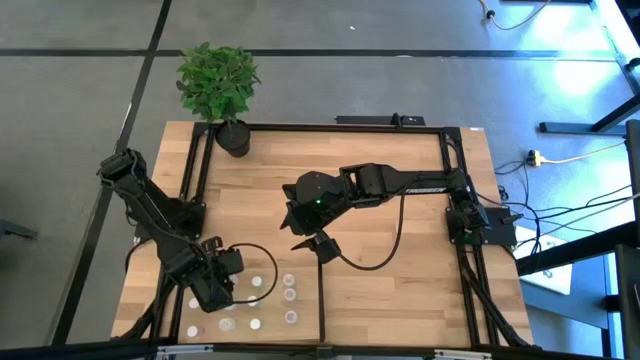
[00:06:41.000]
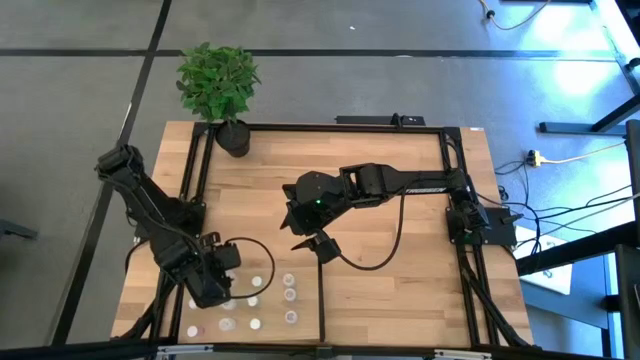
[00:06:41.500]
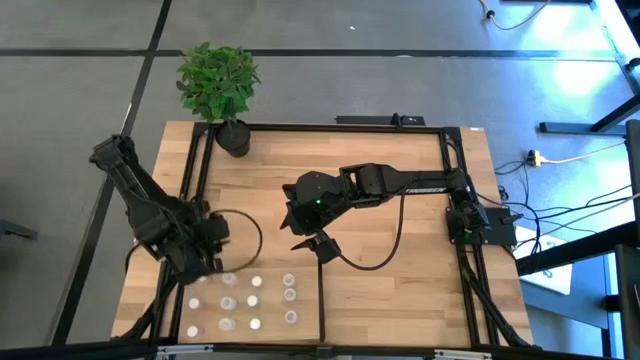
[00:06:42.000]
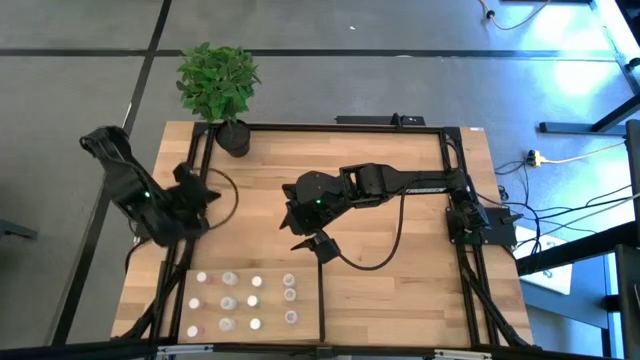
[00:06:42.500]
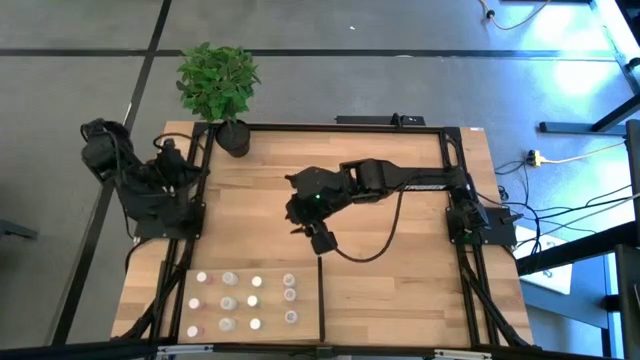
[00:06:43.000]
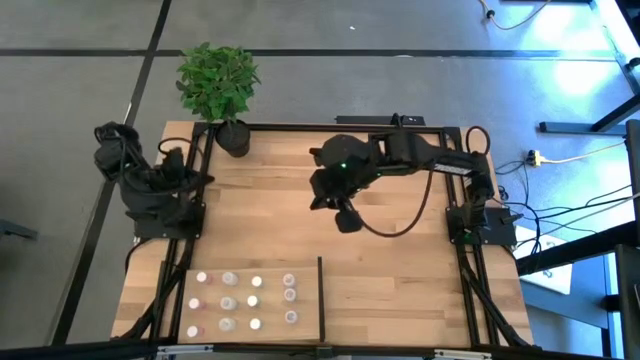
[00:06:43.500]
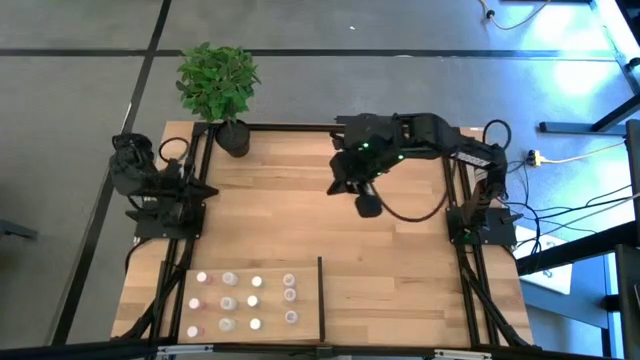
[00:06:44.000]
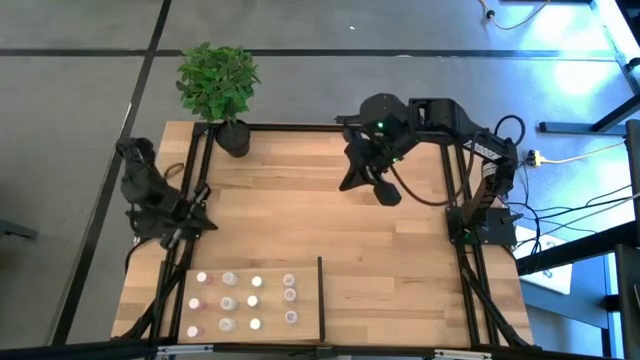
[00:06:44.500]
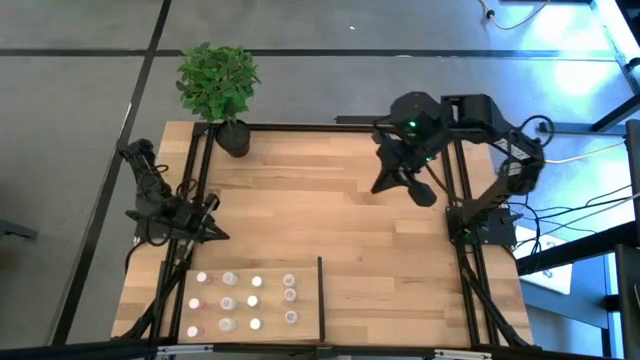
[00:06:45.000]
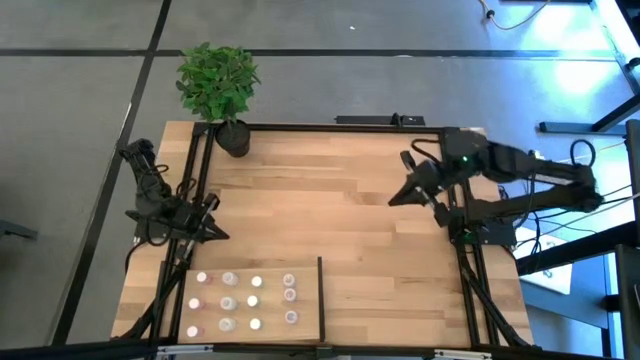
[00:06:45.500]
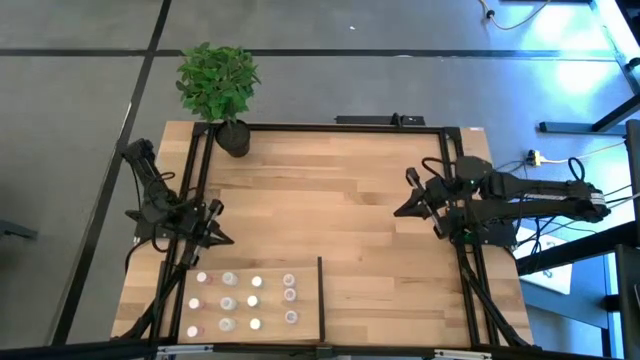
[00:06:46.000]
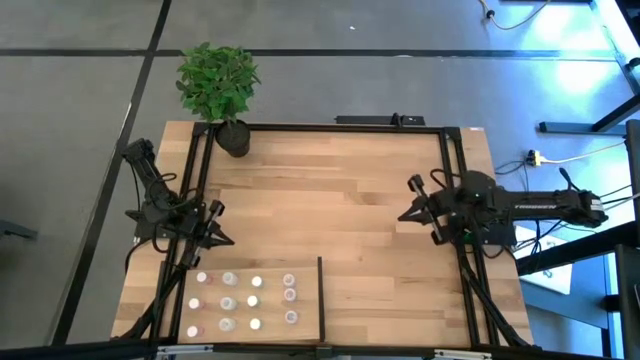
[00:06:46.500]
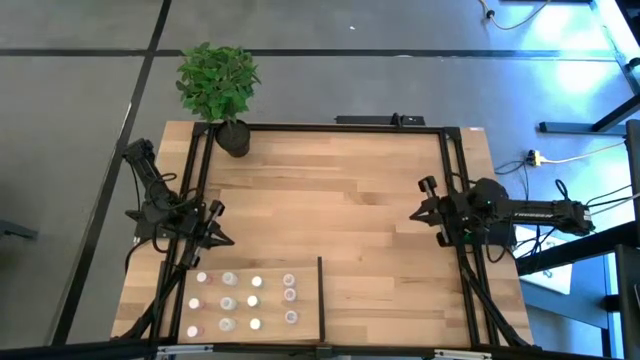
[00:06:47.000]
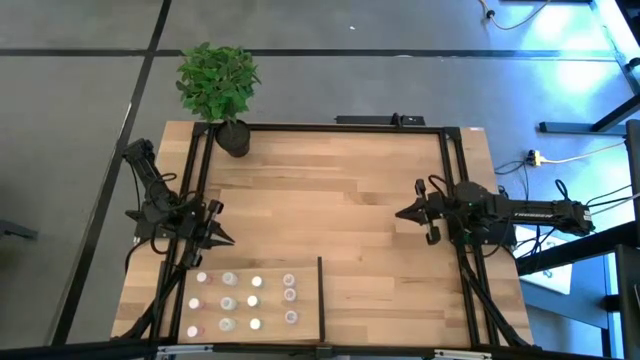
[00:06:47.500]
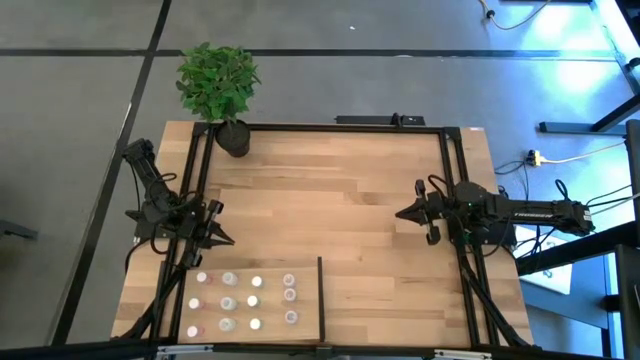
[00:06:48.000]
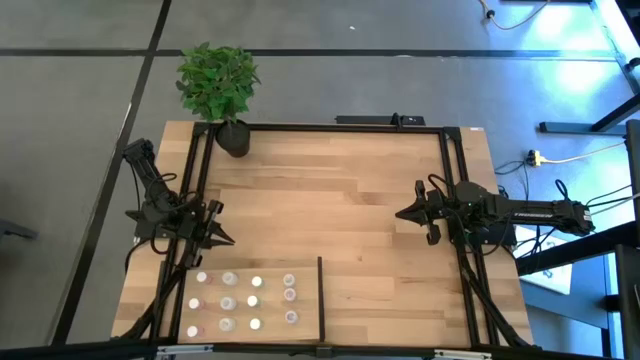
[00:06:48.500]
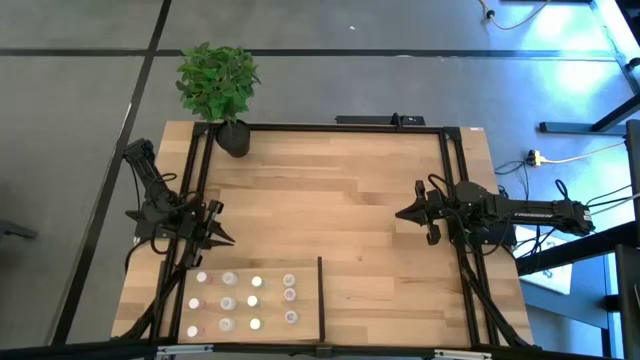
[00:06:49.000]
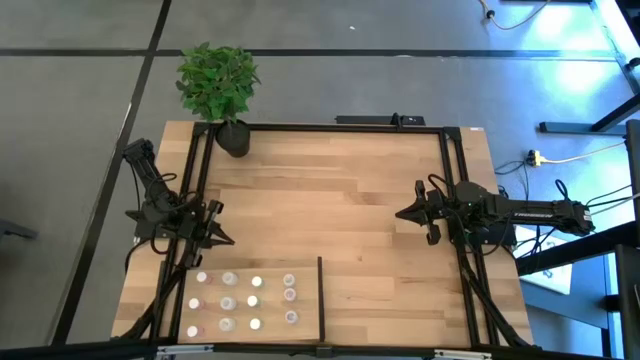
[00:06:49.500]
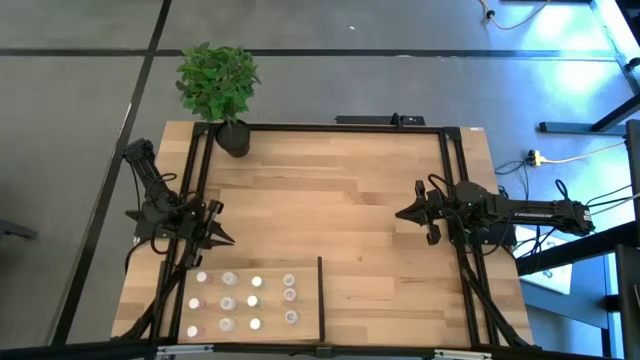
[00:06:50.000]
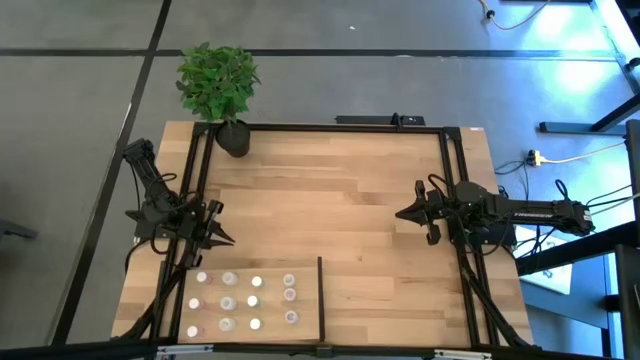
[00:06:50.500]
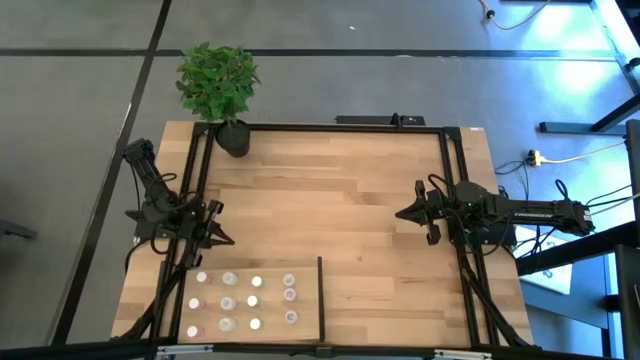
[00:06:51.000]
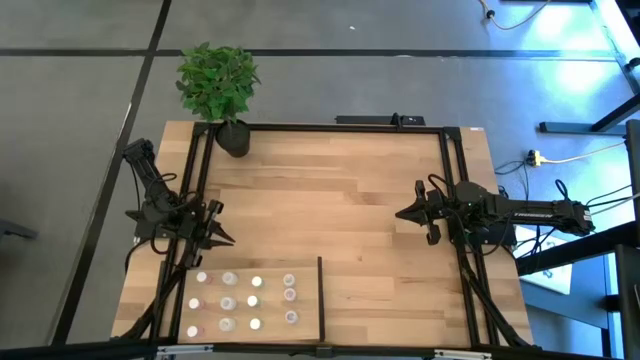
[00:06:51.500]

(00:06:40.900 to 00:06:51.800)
Task: Pick and place medicine bottles onto shelf by color
Return to Home Position

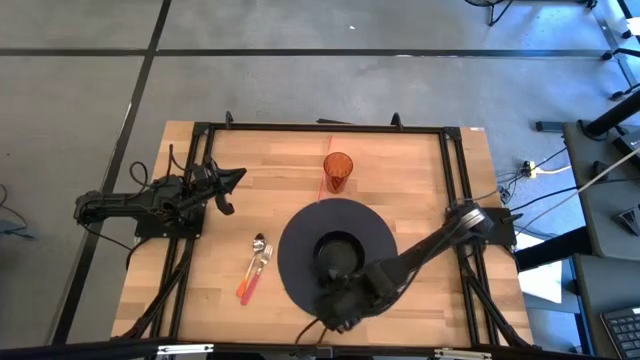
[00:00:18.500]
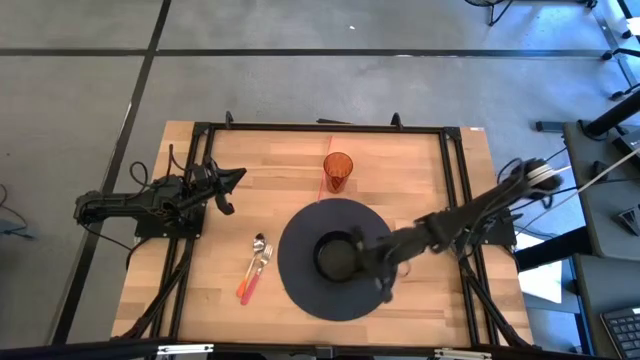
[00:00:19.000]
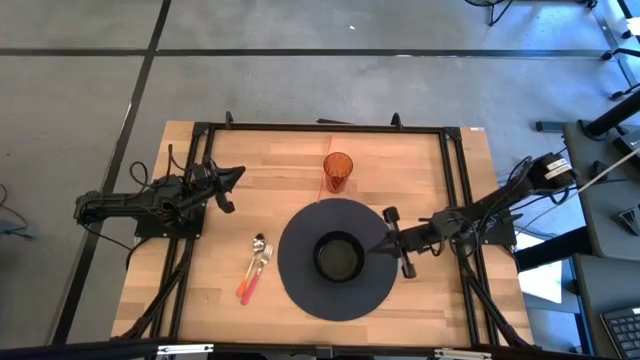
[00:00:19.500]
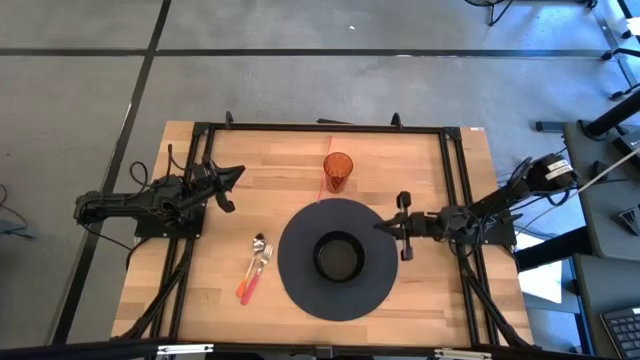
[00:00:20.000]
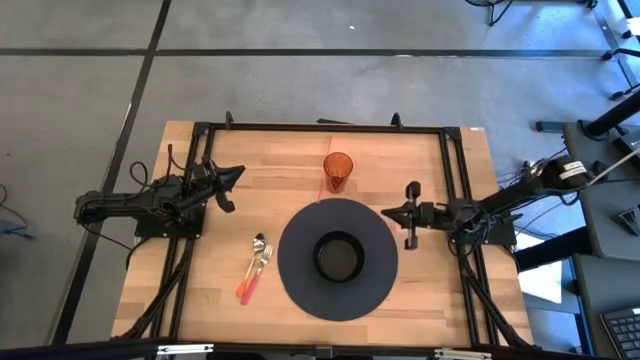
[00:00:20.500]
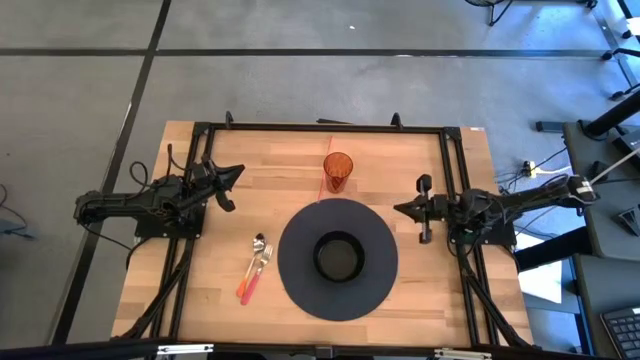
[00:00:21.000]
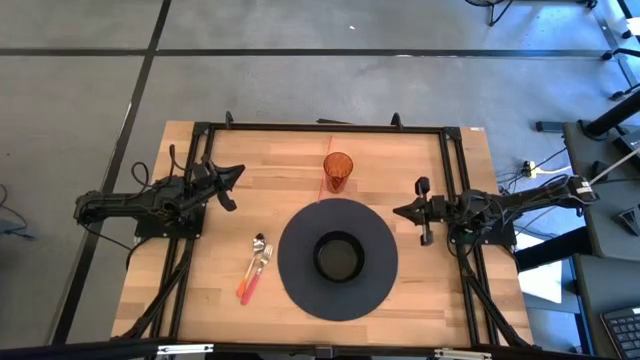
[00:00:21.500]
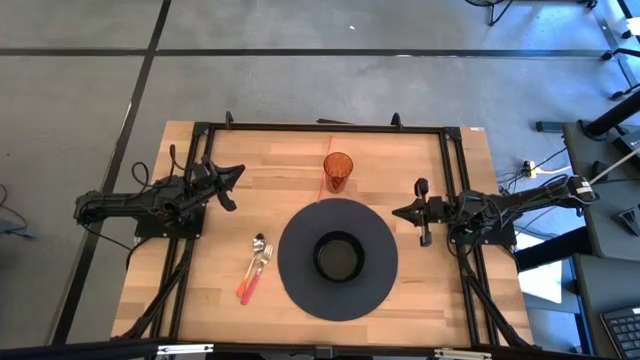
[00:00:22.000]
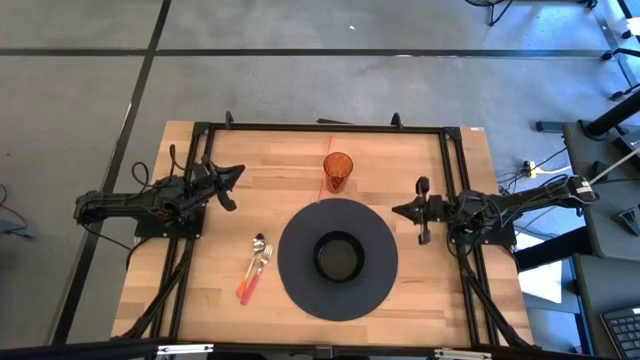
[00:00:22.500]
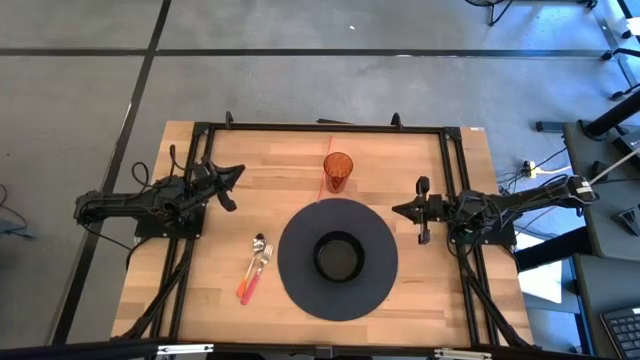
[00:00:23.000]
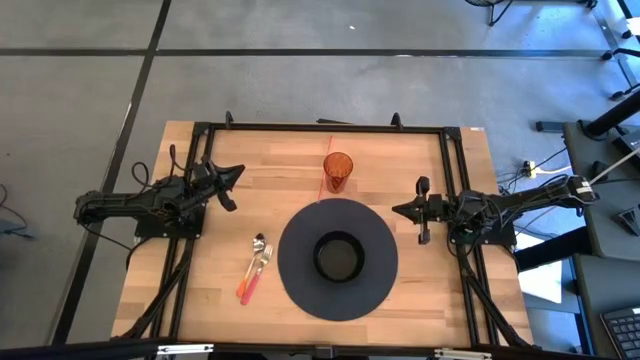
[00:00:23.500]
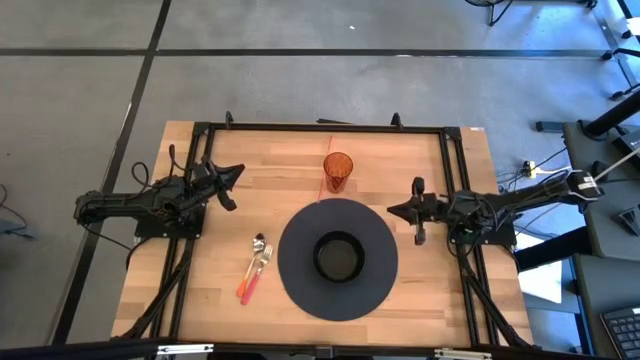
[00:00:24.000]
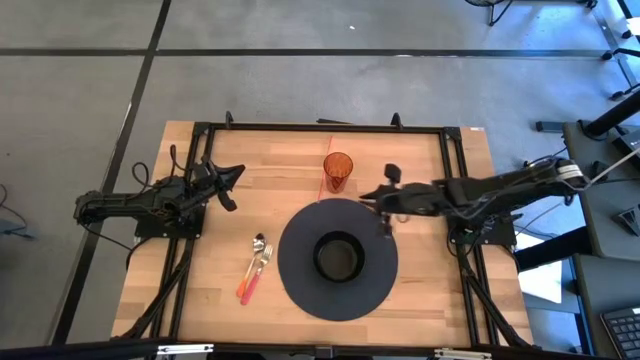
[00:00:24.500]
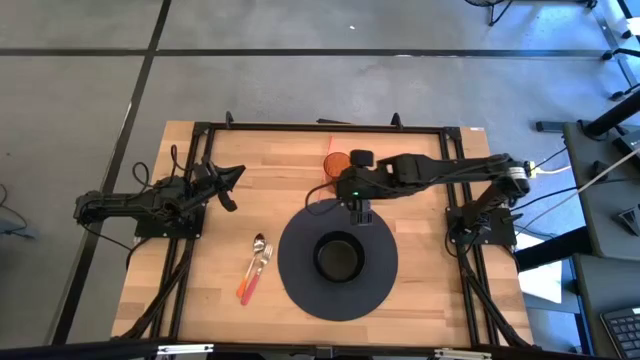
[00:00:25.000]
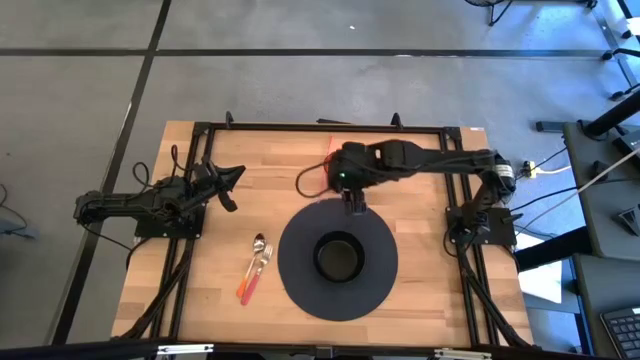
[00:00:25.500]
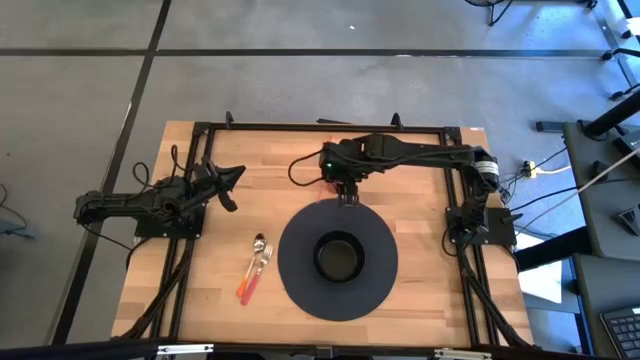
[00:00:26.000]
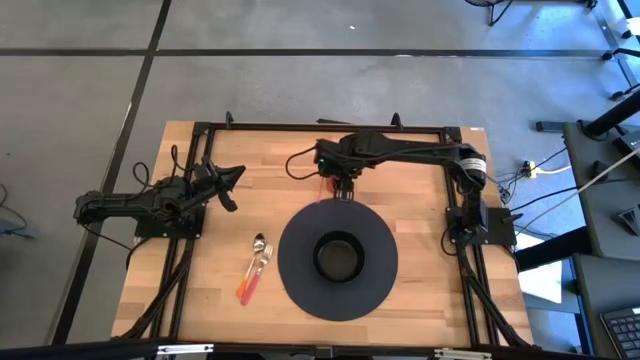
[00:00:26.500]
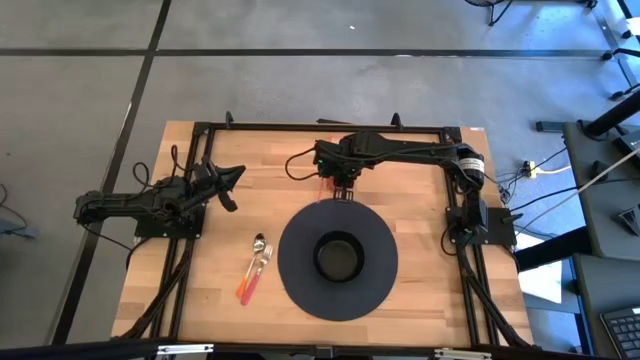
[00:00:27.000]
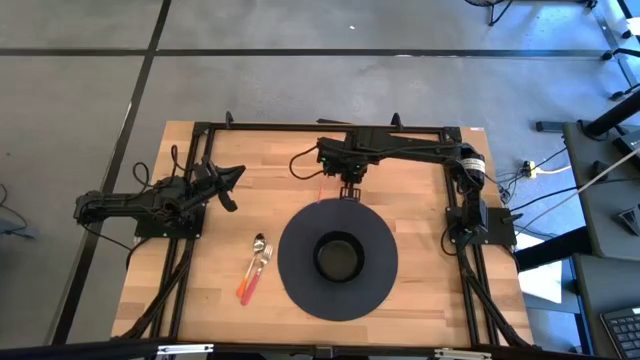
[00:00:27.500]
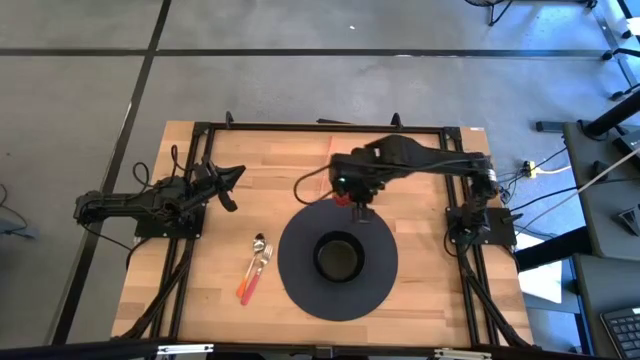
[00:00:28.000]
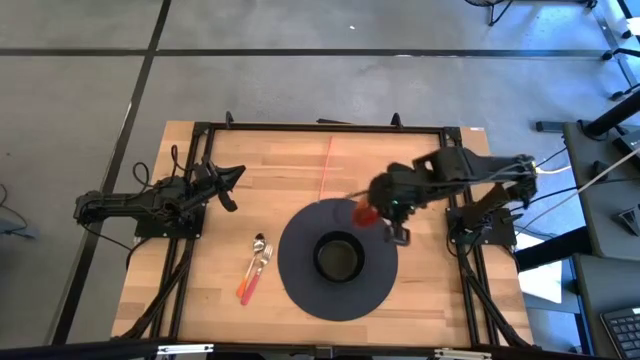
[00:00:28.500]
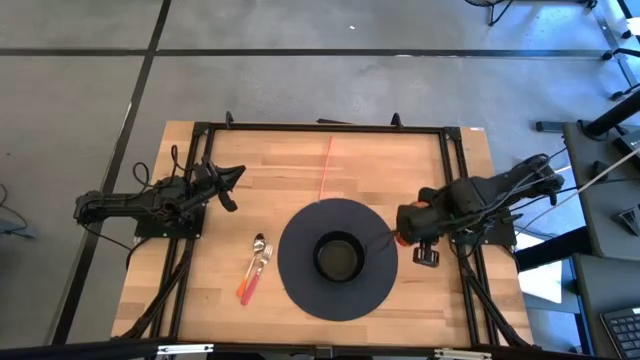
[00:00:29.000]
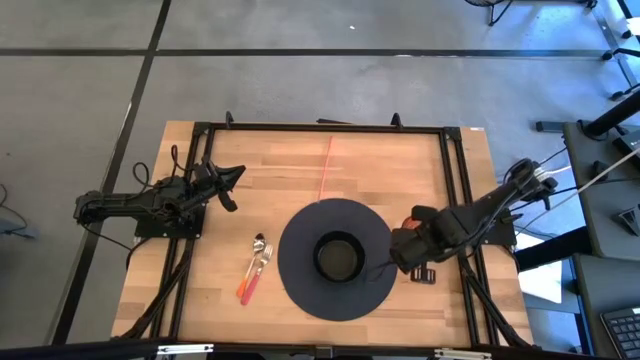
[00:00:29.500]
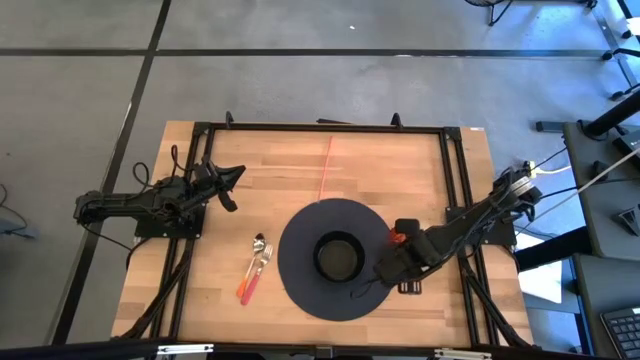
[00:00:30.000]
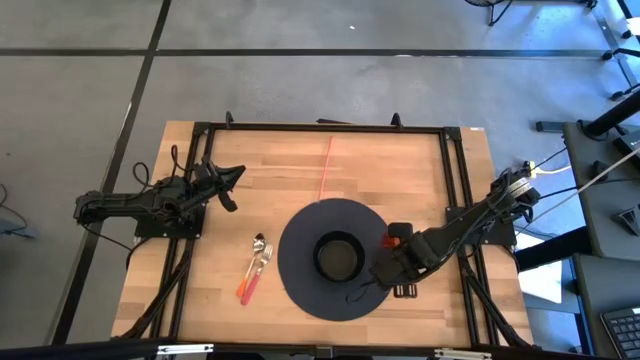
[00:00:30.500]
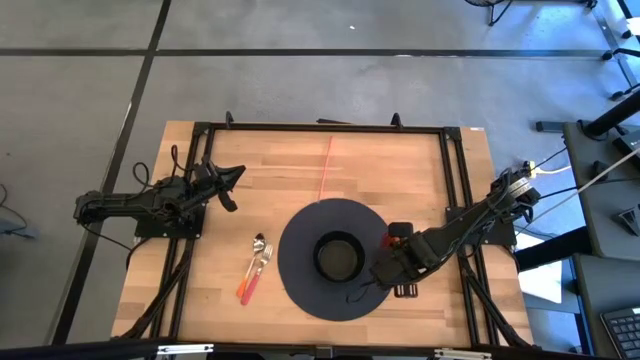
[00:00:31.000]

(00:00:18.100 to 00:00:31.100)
Task: Pick & Place Utensil
Put the orange cup to the right of the black bowl on the mat
